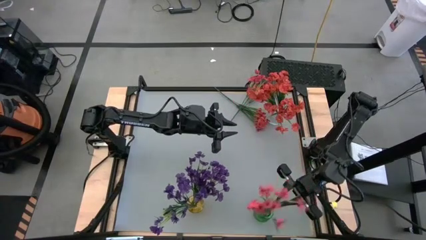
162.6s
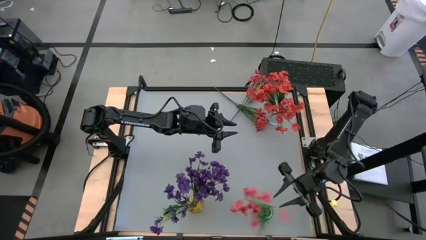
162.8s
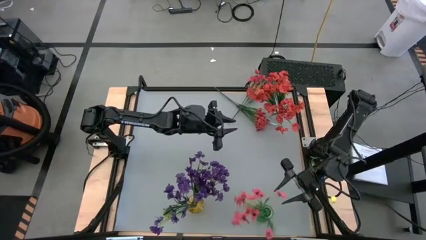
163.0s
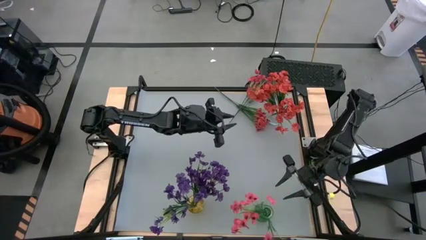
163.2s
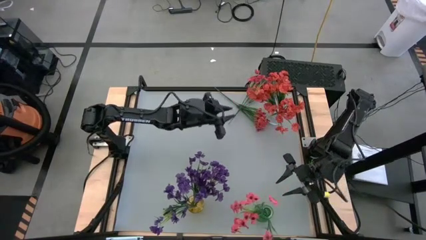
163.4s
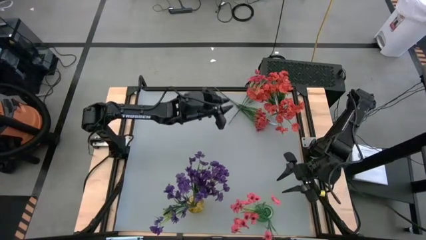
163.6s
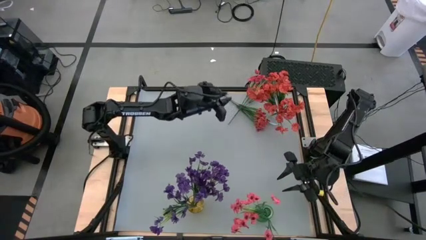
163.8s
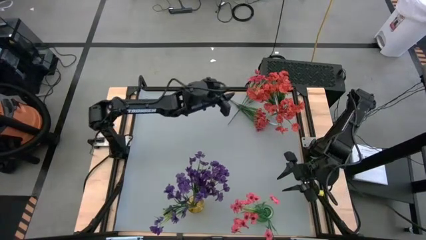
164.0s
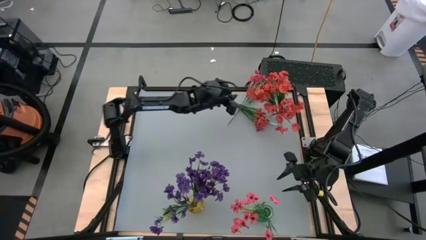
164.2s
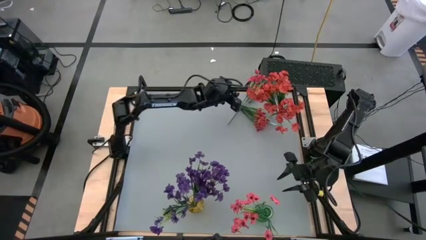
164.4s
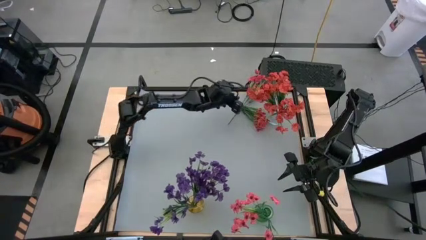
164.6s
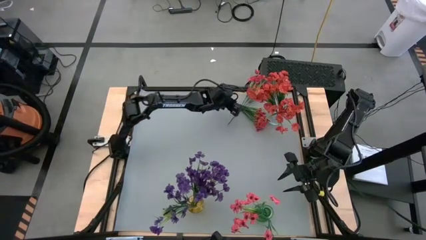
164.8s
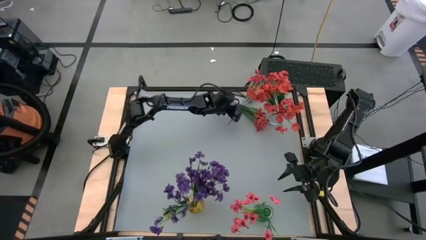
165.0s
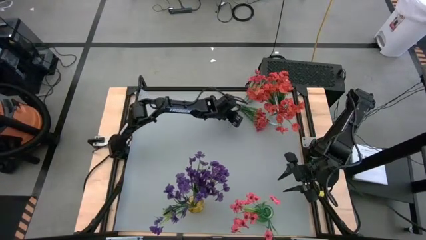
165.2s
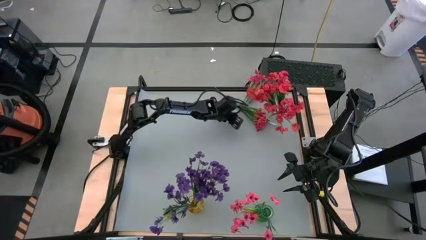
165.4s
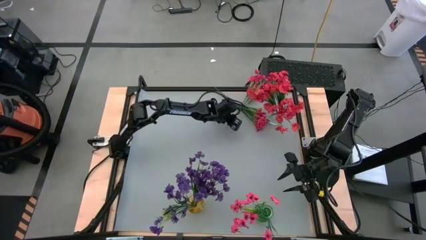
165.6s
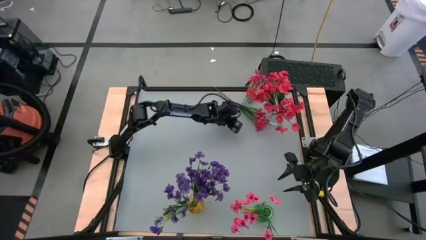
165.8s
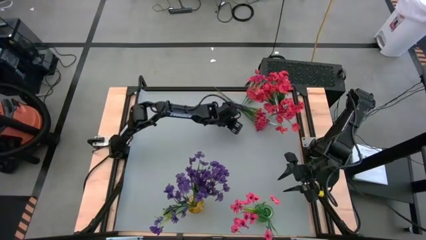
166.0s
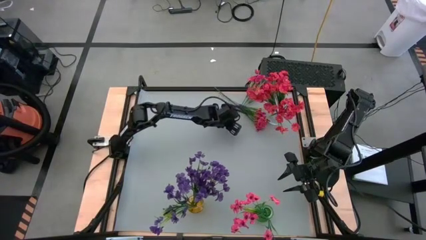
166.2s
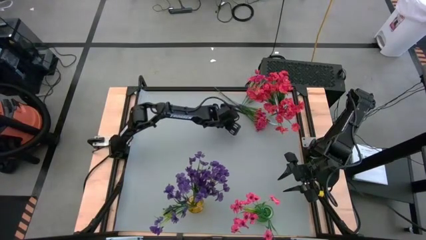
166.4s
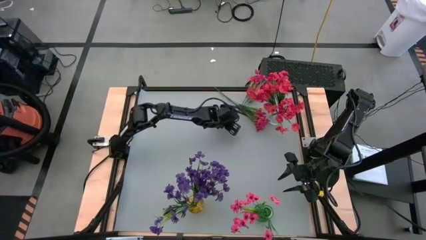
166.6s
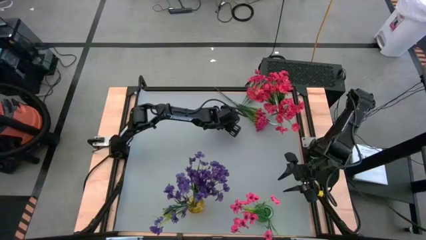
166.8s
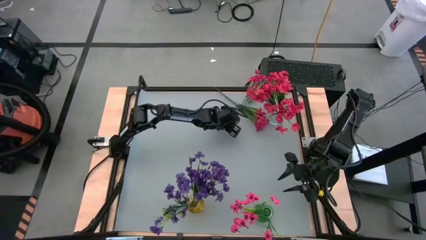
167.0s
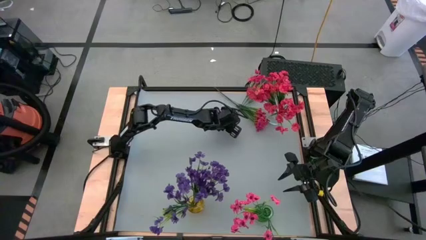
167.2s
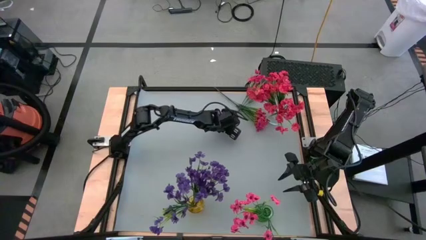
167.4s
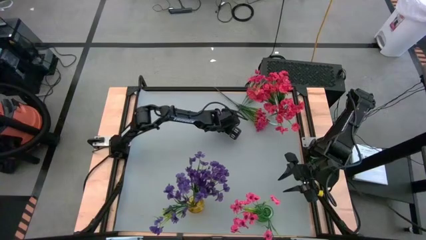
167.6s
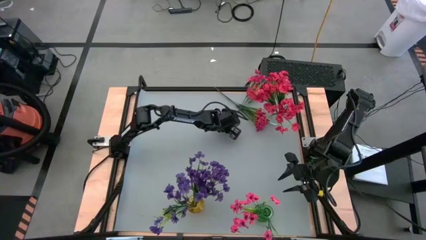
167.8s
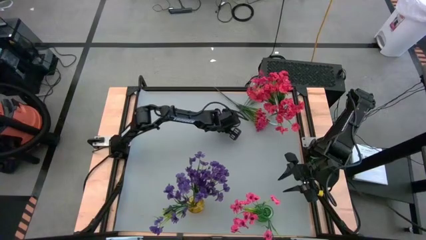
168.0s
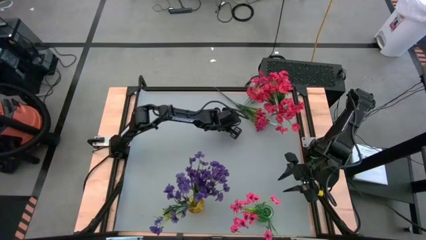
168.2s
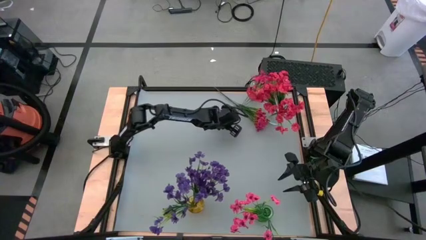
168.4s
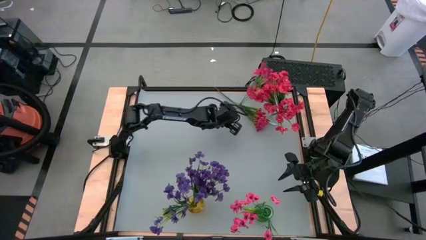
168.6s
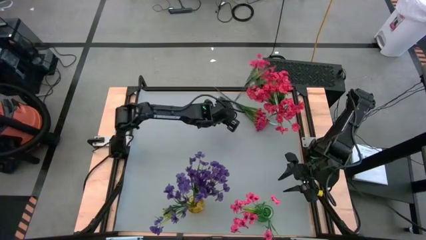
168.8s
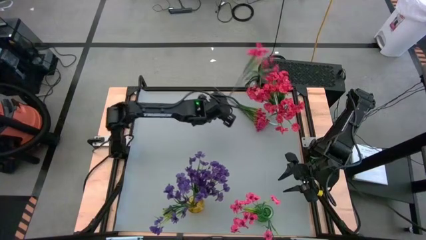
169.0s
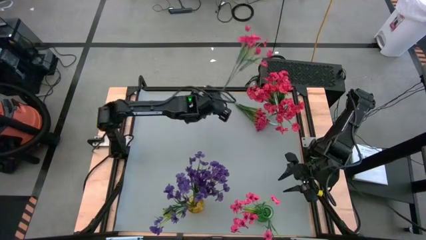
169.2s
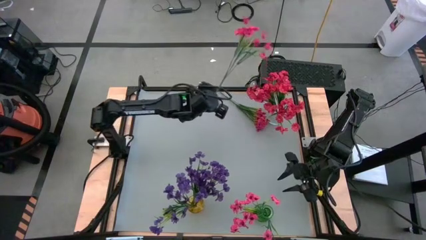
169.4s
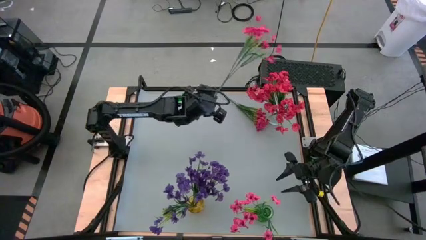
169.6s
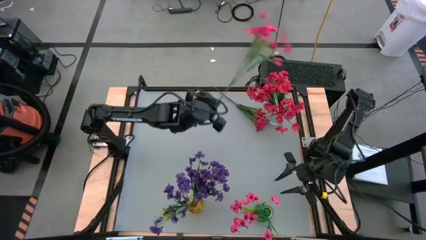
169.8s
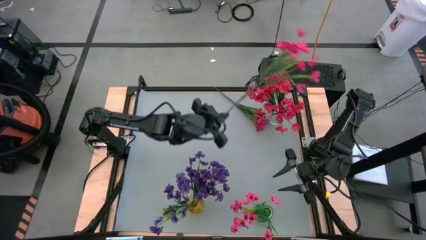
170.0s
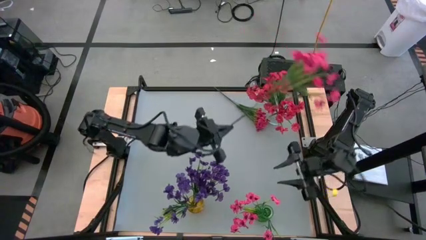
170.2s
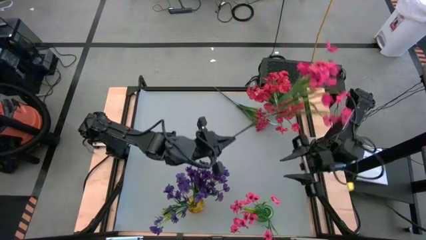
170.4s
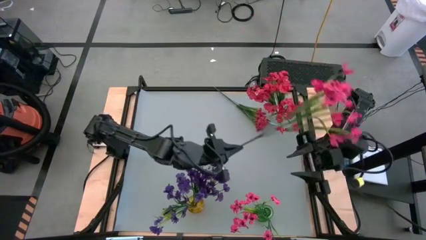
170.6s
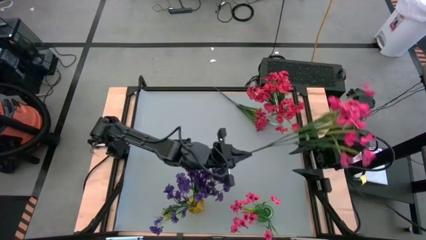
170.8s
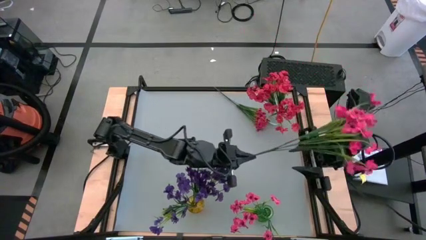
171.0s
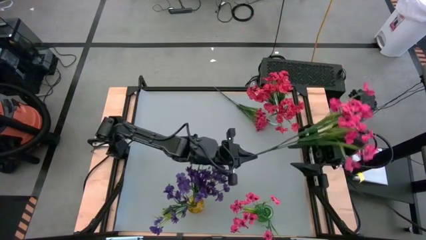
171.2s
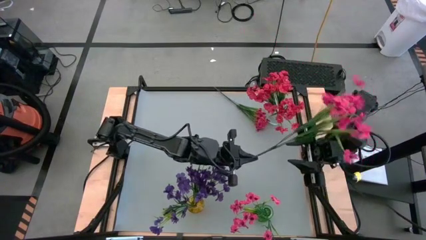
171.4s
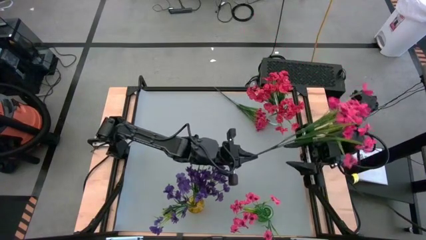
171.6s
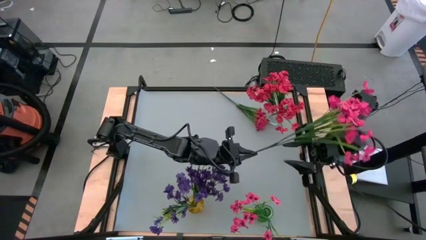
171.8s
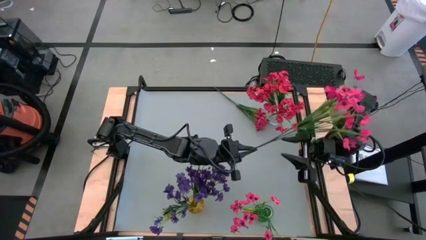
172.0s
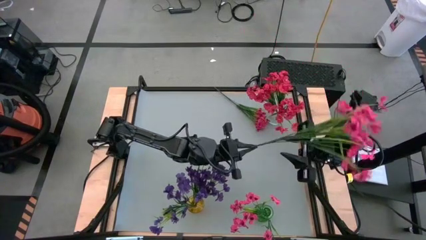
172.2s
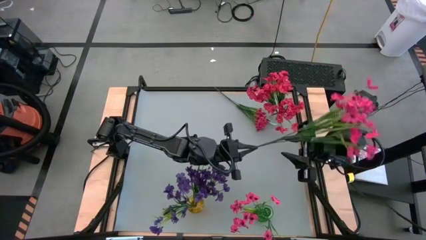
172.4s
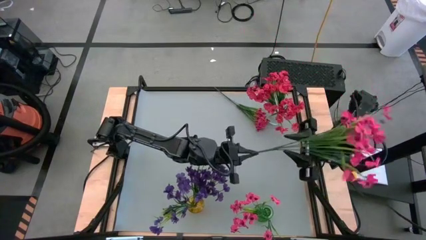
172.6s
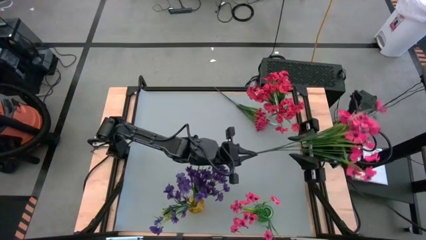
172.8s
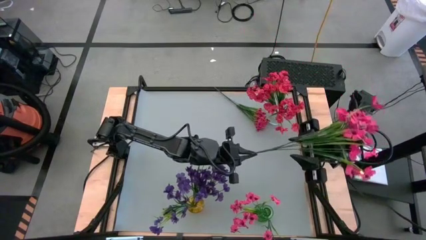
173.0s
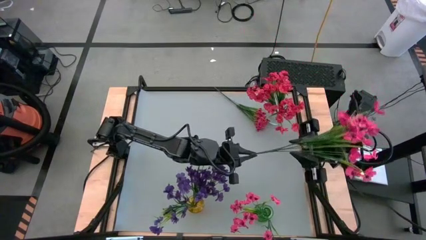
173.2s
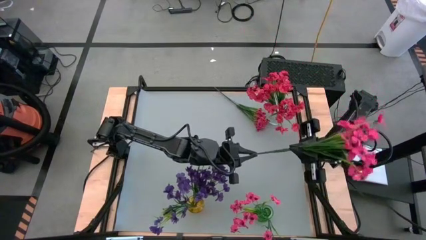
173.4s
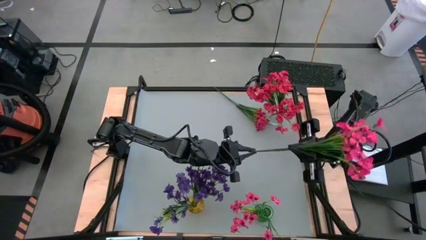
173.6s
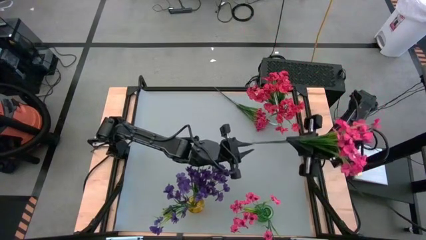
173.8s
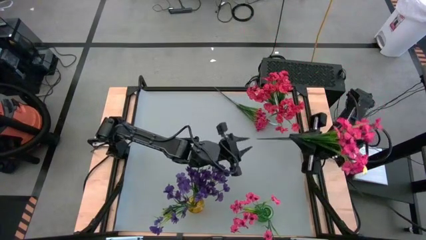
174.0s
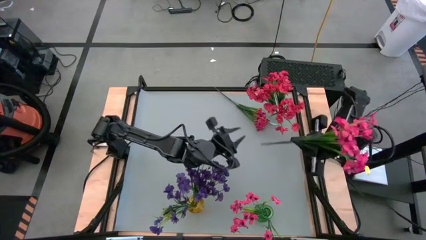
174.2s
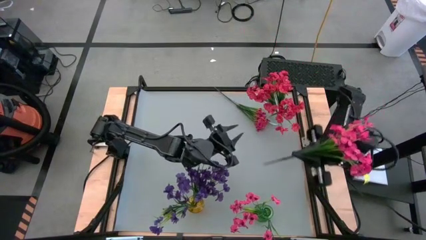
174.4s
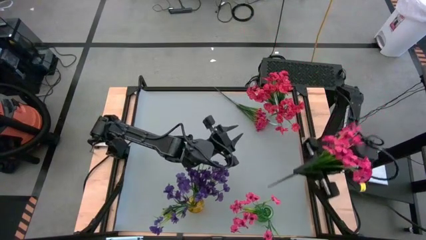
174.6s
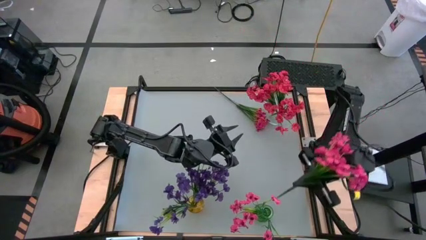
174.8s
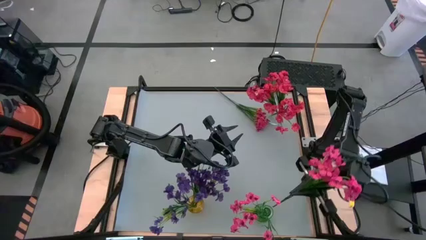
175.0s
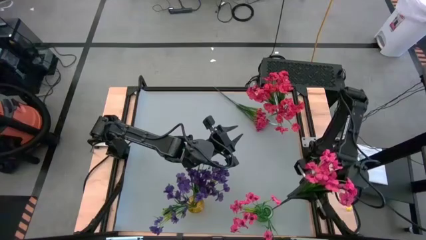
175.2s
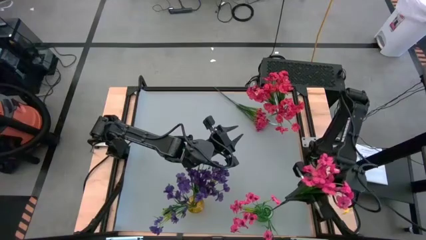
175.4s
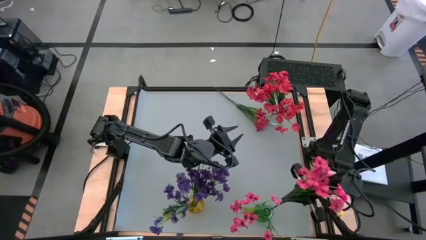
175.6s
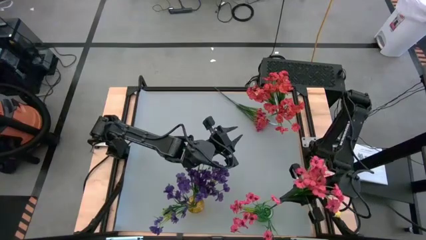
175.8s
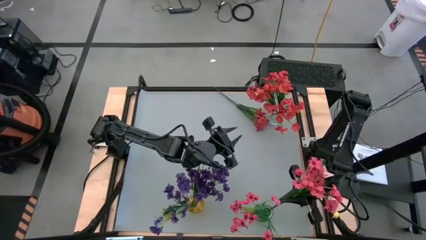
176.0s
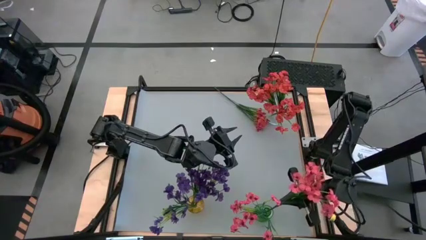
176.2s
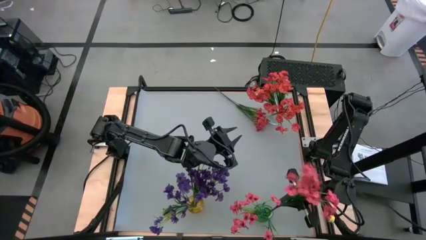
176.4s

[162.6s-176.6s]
Task: Sort flowers into vase by color
Put the top pink flower into the green transparent vase

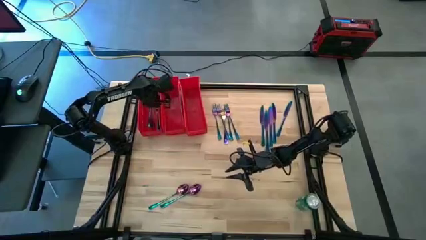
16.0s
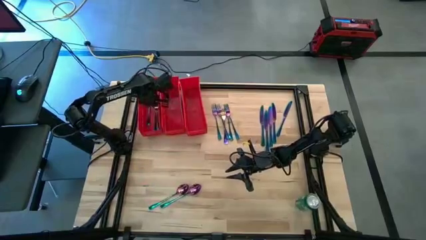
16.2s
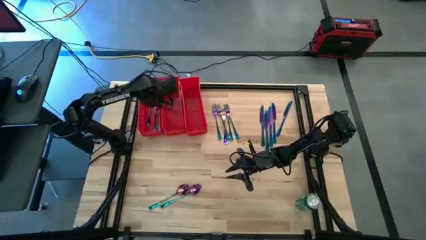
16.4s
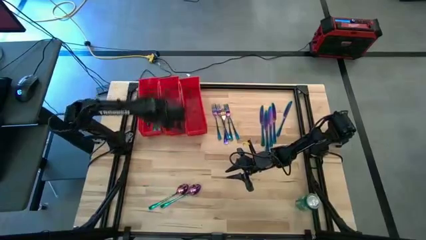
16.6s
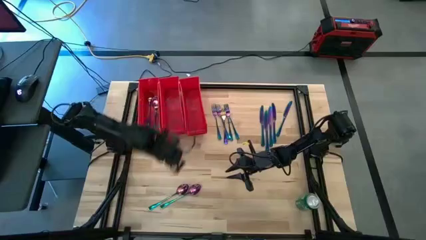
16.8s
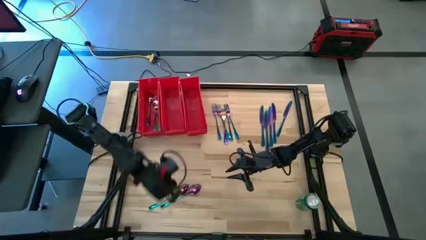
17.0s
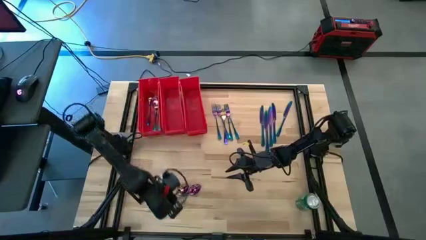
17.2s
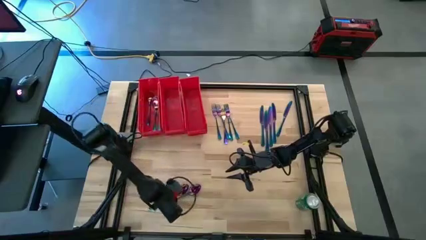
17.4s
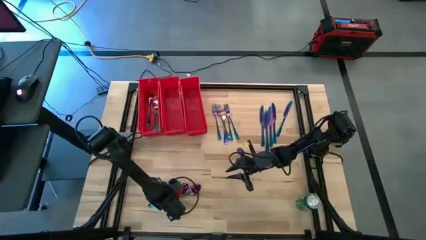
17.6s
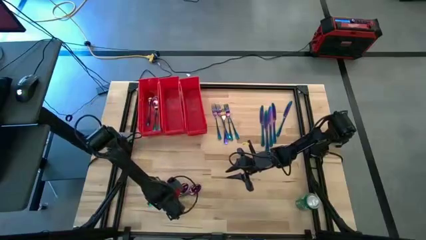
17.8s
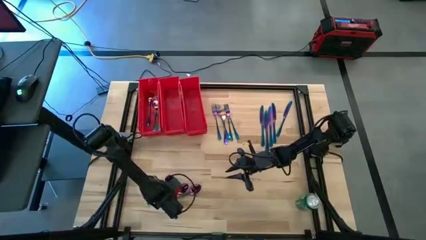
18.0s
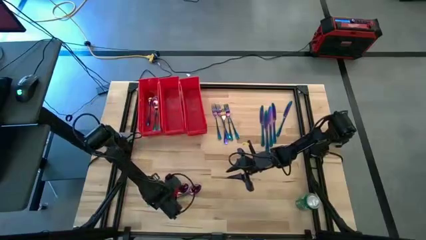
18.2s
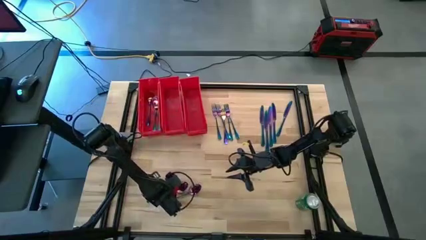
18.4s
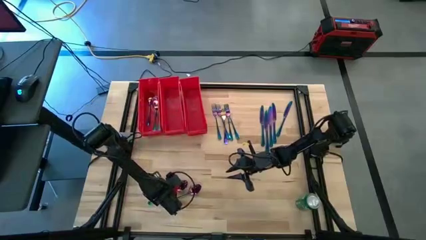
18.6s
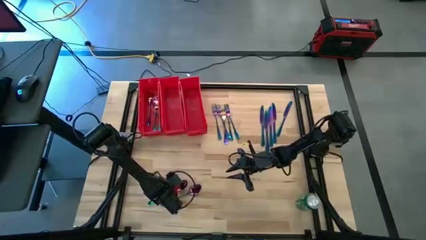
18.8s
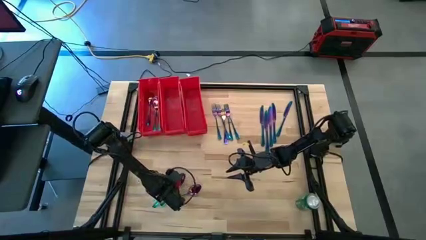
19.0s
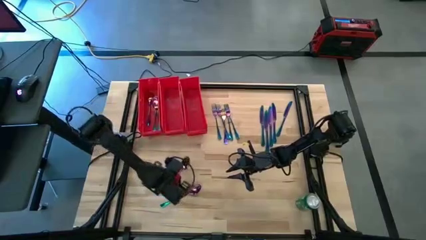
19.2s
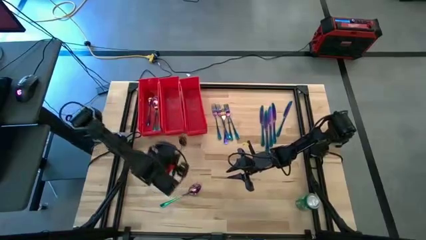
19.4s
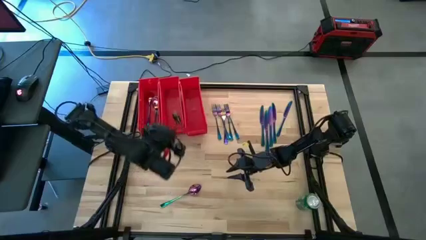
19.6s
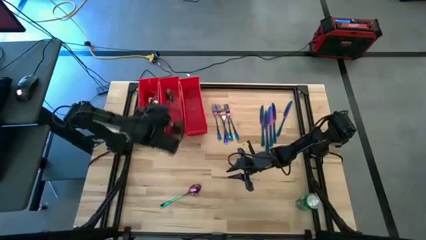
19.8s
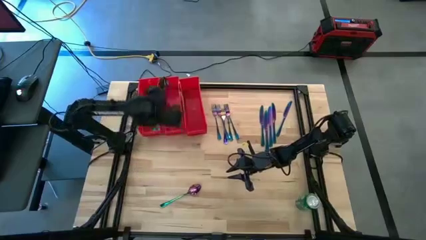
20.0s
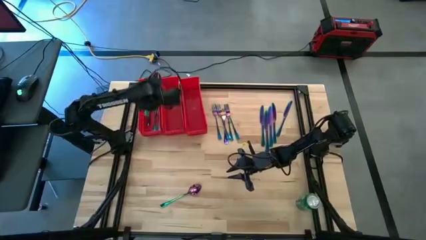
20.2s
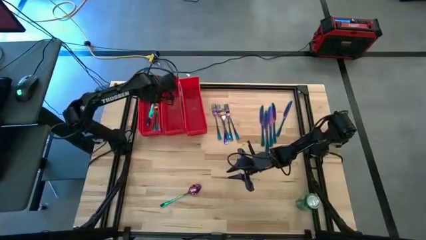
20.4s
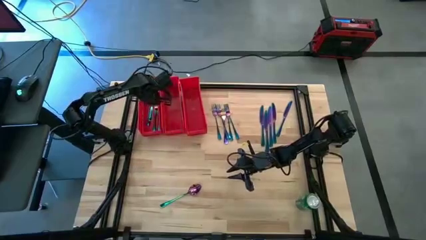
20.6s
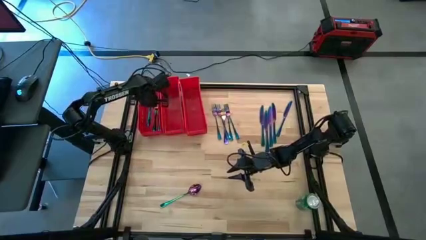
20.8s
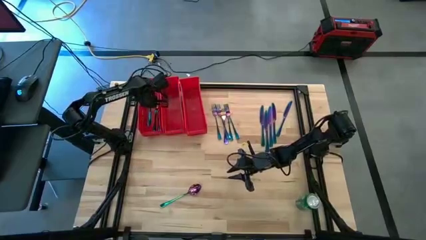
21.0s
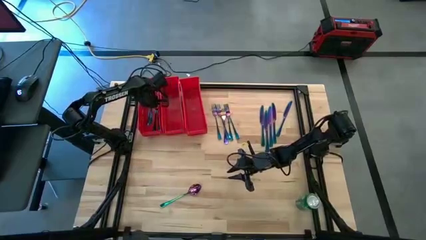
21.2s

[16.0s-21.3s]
Task: Sort silverware
Put the blue spoon into the left red bin
